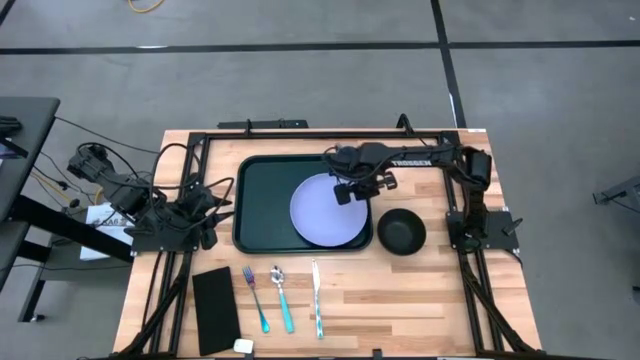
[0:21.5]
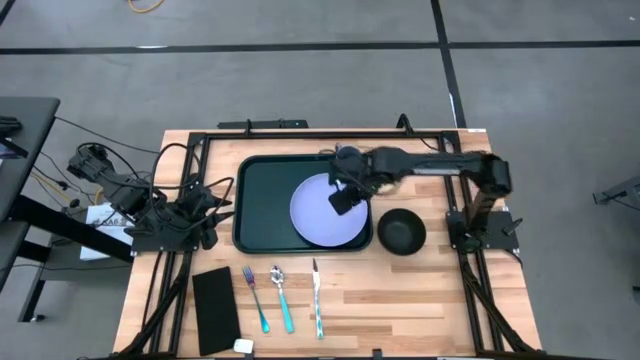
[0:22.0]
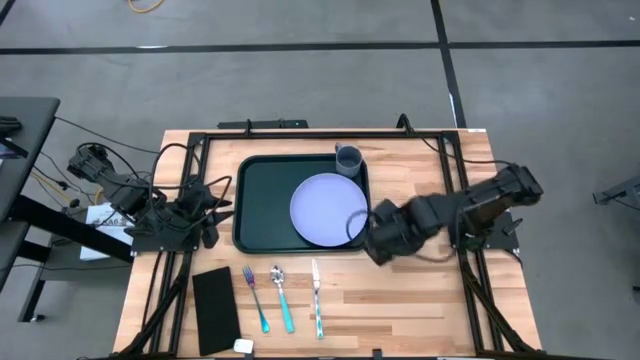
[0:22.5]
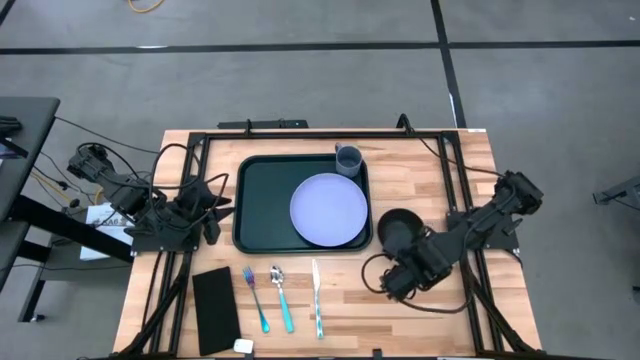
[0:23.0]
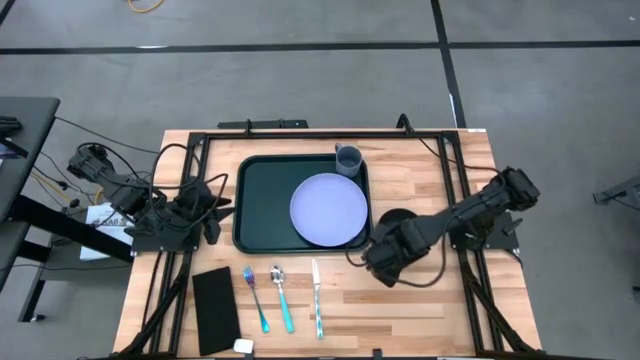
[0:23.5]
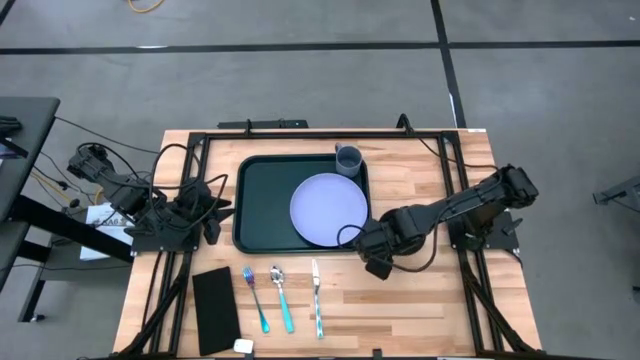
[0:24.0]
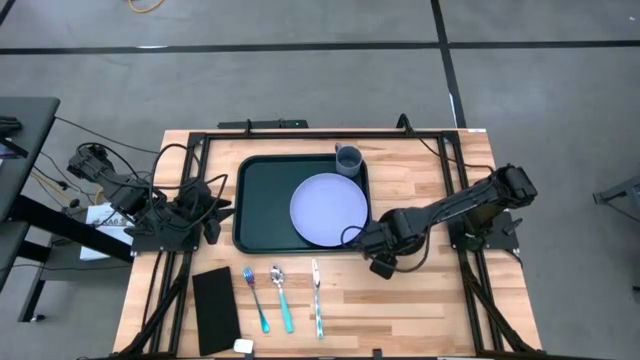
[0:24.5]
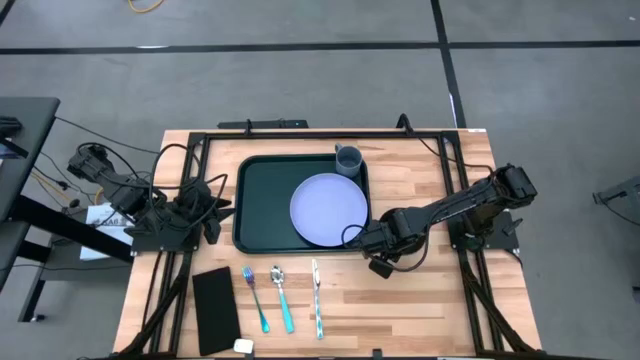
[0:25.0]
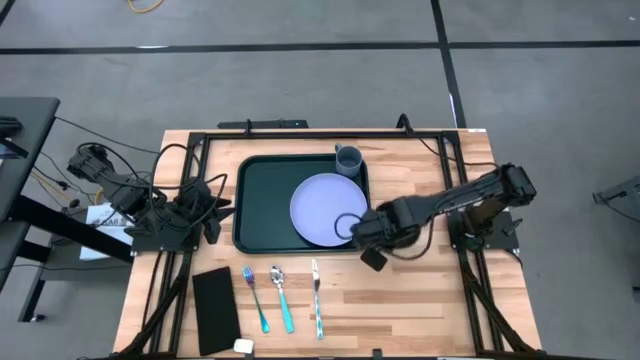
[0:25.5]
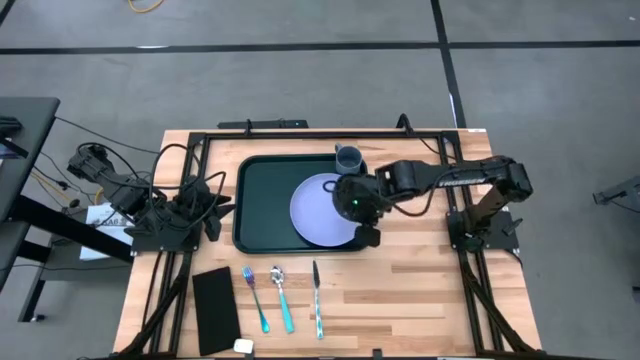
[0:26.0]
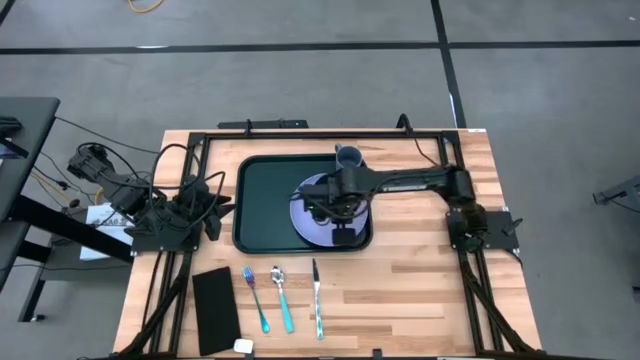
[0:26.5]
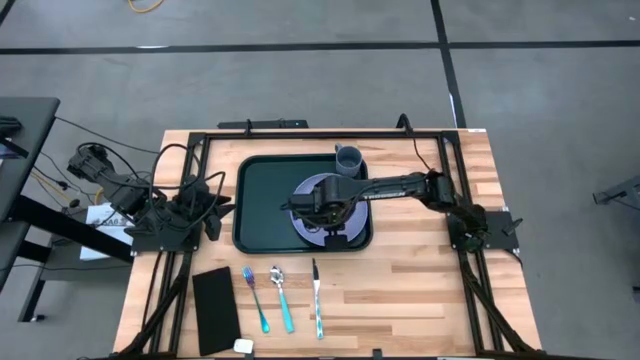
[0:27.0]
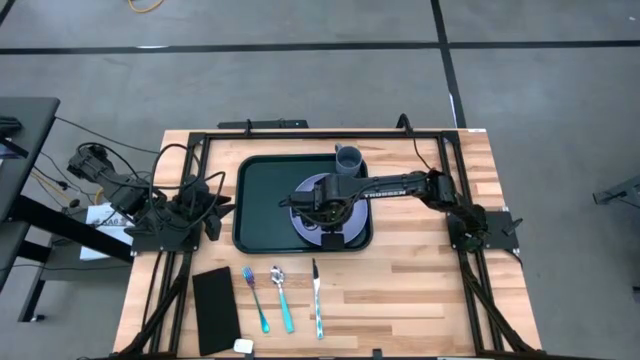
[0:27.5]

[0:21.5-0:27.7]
Task: Set up tray
Put the black bowl on the purple plate

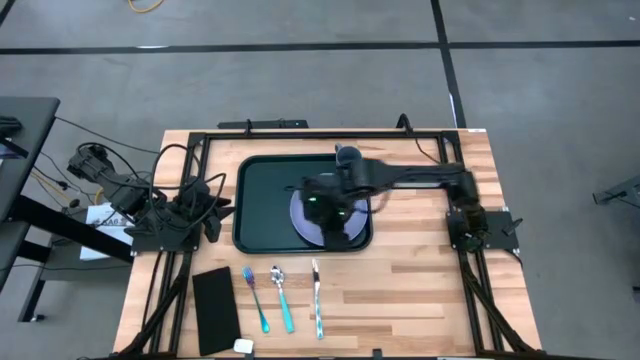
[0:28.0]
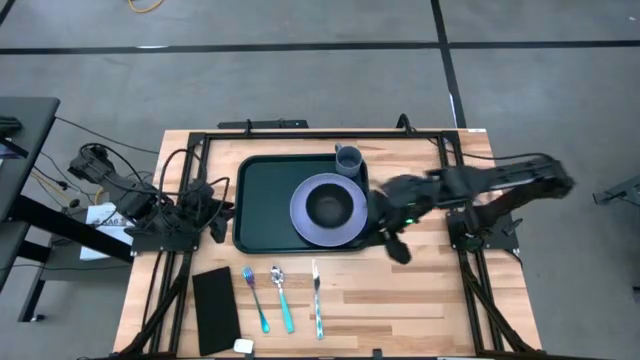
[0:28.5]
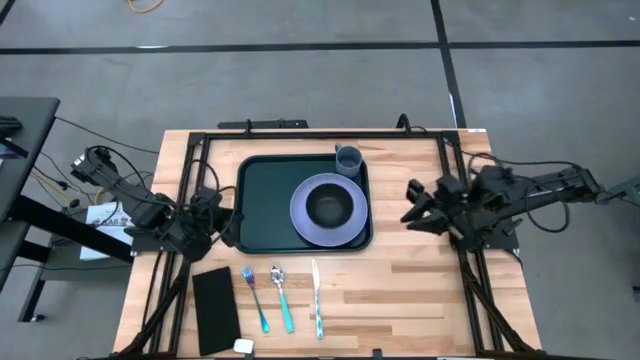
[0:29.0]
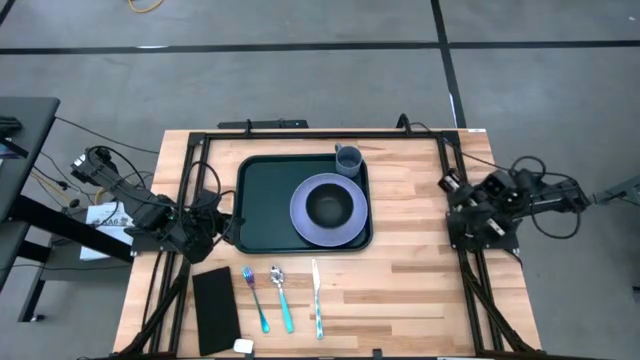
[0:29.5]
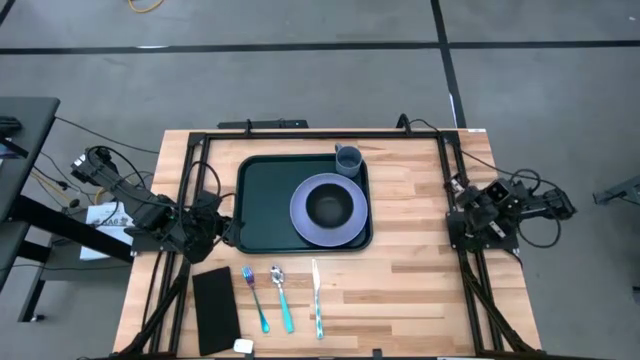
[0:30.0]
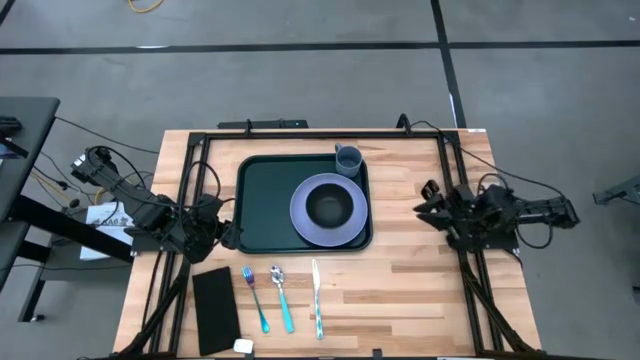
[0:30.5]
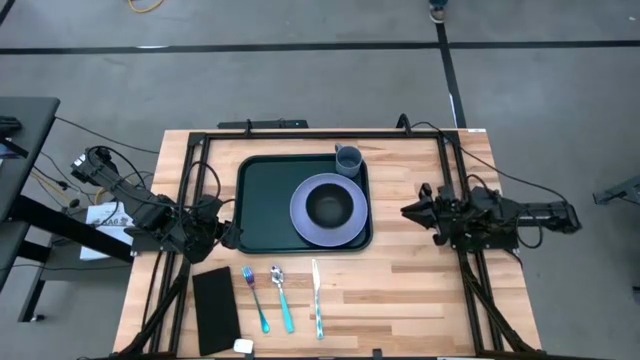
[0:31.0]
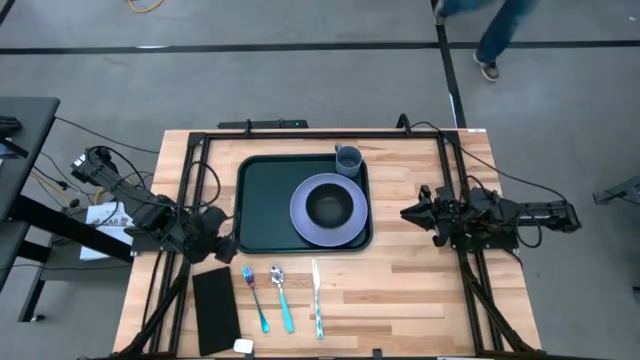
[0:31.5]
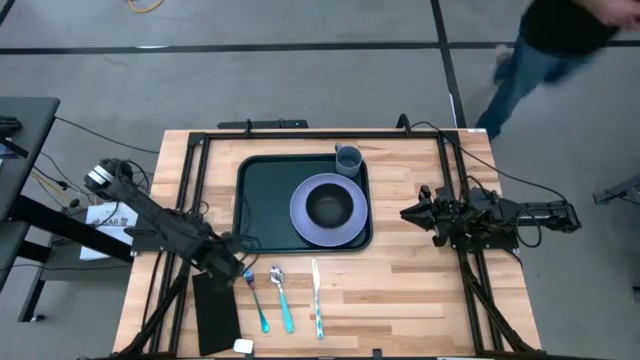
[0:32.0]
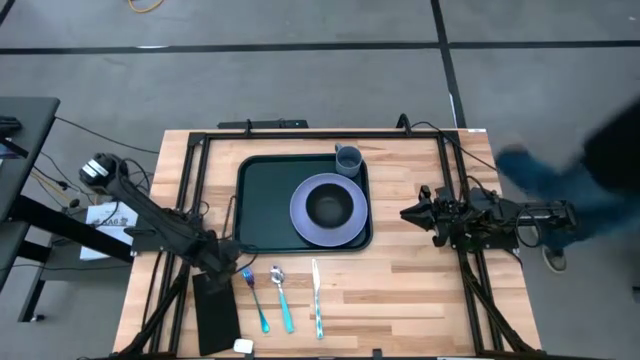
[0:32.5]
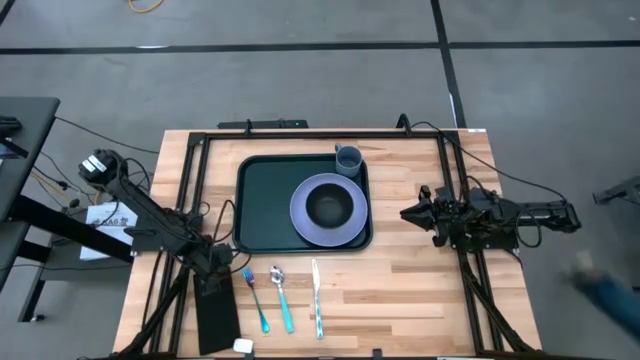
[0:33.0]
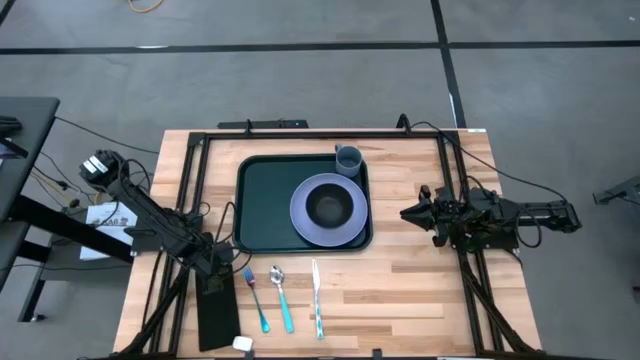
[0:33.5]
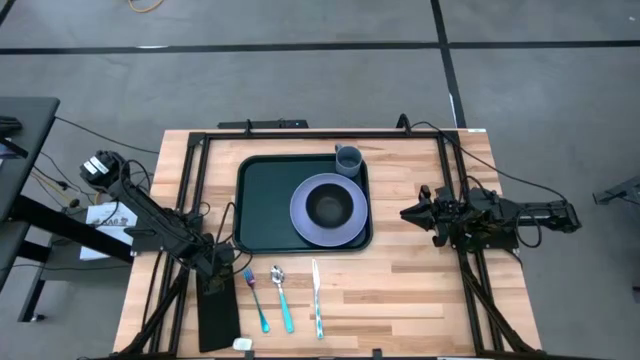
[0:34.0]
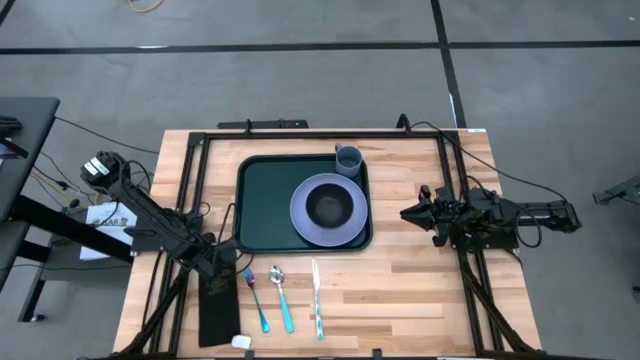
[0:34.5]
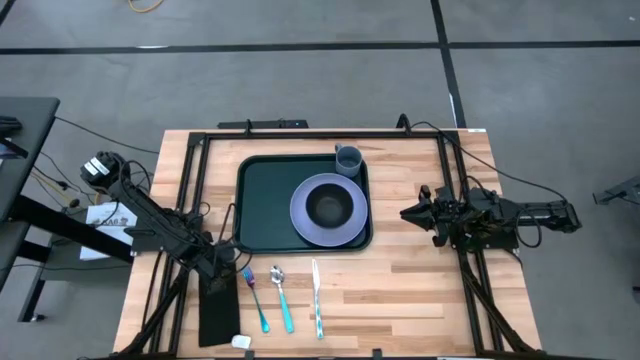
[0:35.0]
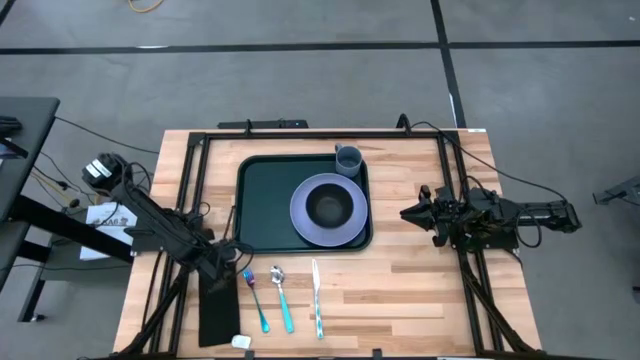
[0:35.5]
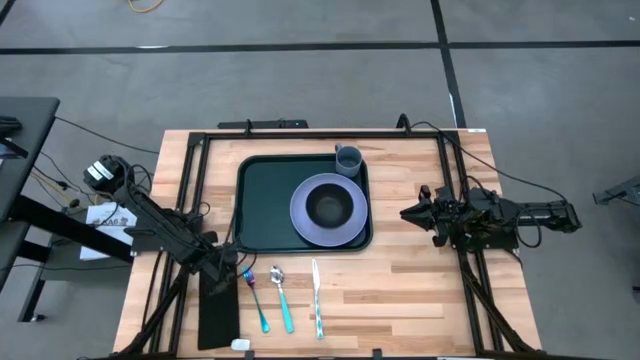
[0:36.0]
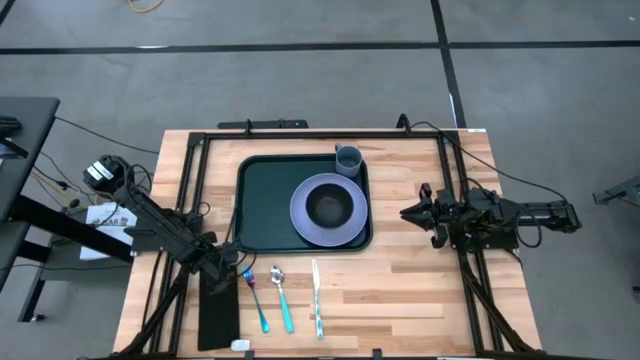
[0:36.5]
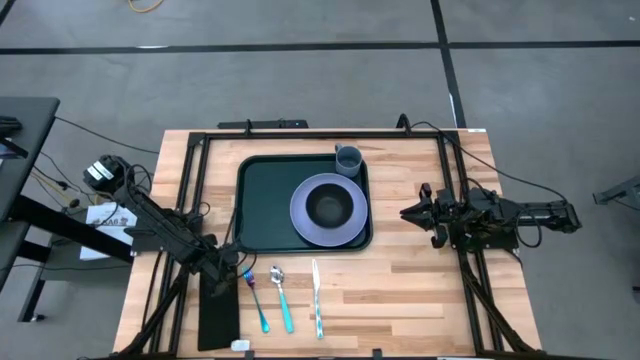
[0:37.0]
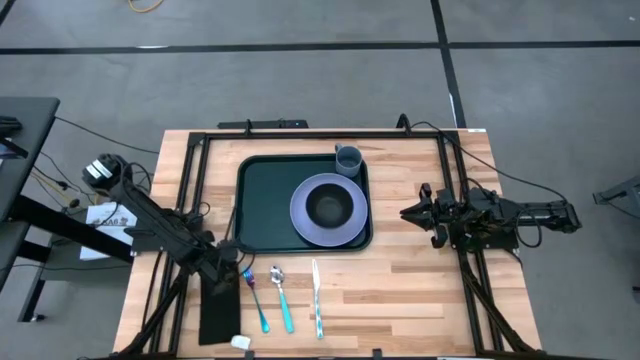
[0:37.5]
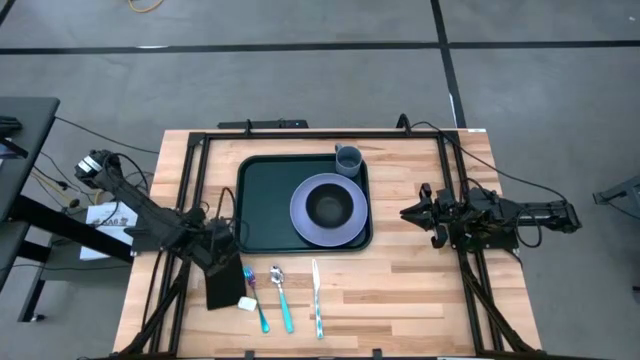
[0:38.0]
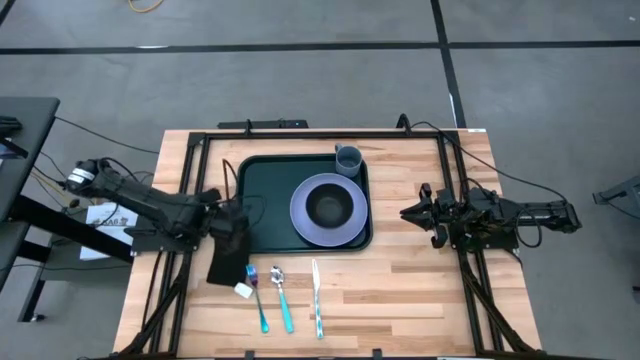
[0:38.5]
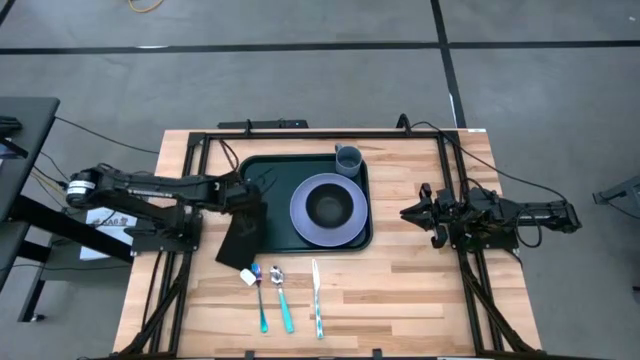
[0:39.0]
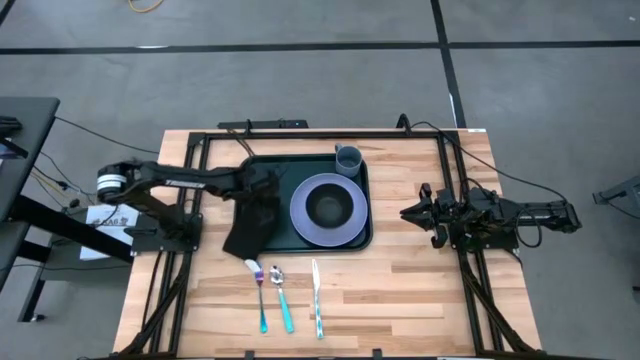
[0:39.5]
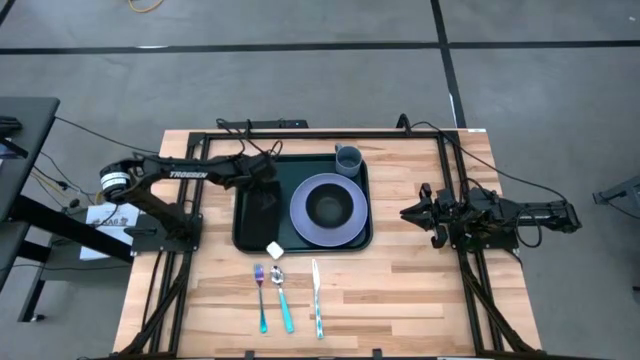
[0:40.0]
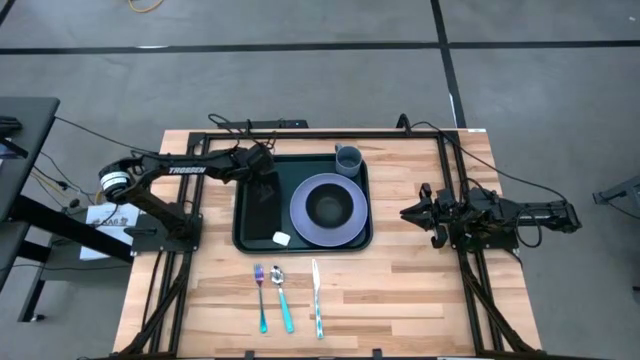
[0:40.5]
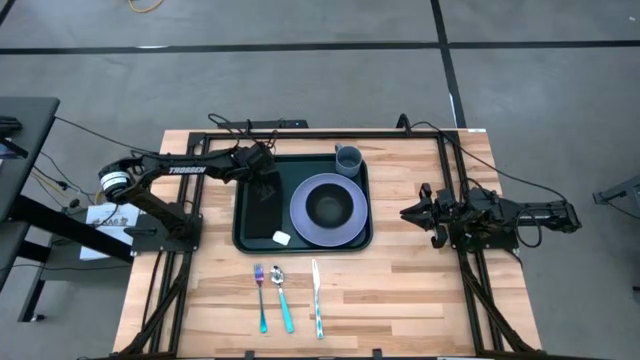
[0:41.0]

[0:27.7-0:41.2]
Put the black napkin on the green serving tray to the left of the purple plate
